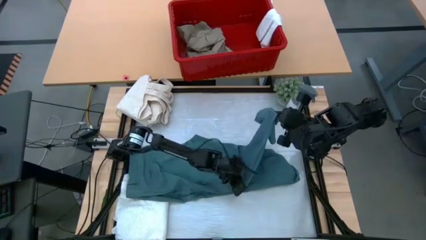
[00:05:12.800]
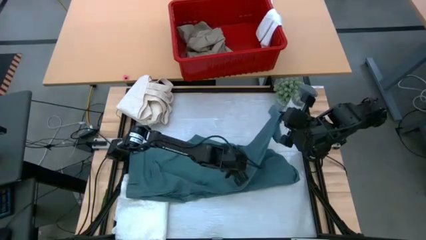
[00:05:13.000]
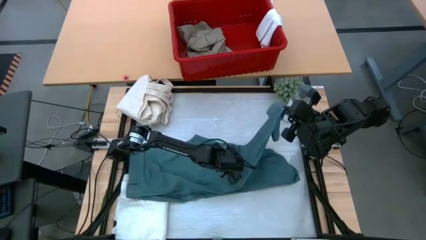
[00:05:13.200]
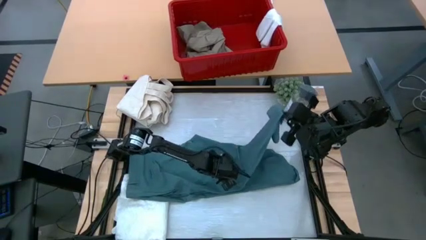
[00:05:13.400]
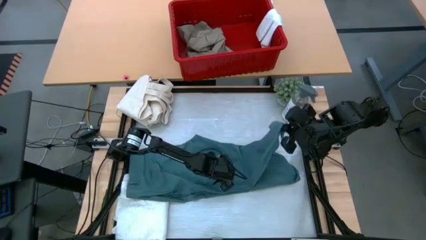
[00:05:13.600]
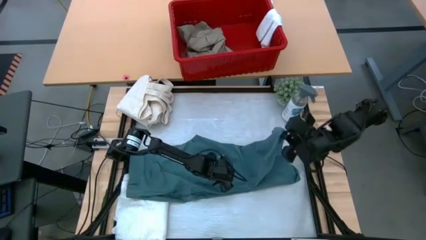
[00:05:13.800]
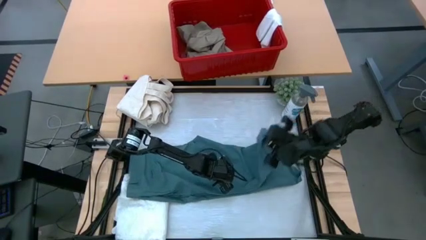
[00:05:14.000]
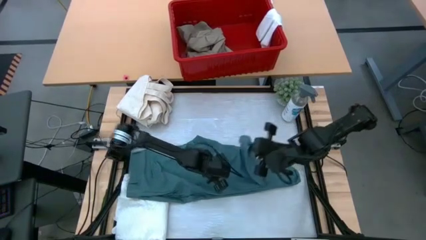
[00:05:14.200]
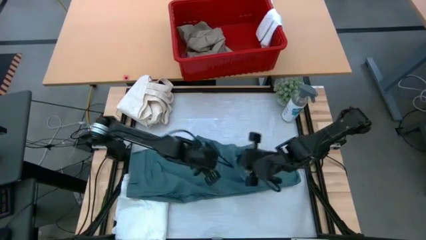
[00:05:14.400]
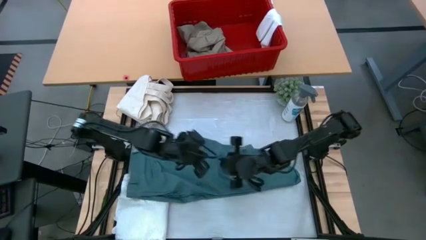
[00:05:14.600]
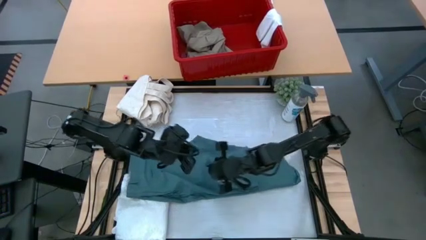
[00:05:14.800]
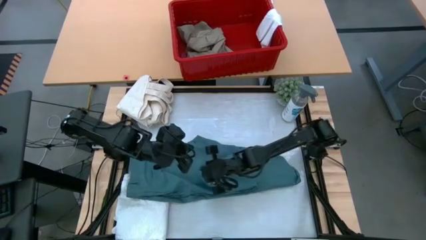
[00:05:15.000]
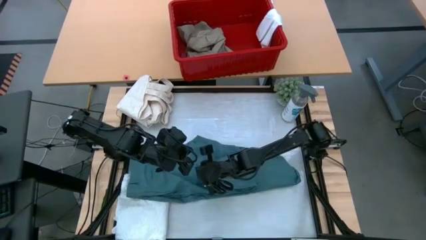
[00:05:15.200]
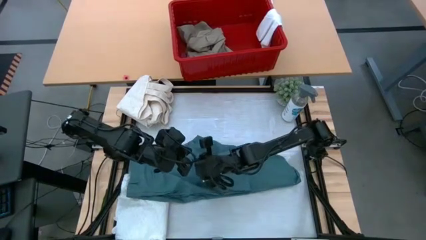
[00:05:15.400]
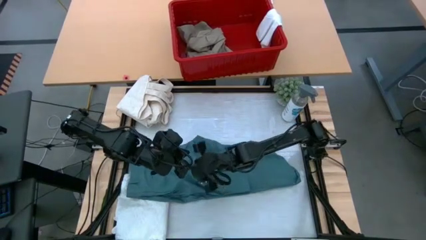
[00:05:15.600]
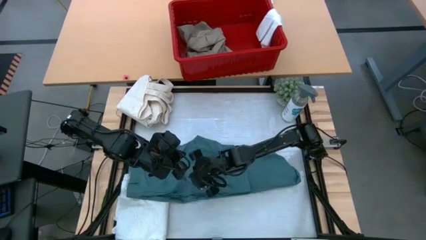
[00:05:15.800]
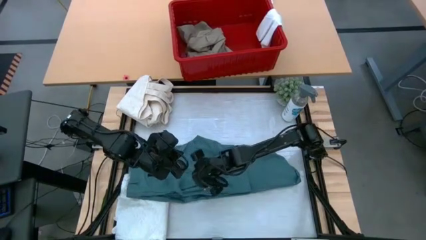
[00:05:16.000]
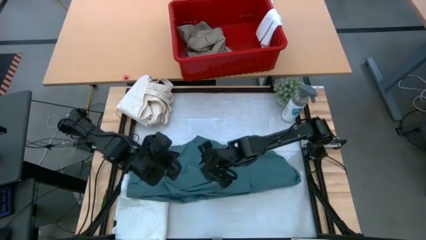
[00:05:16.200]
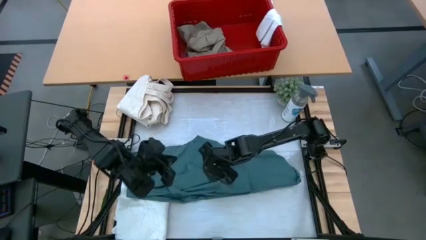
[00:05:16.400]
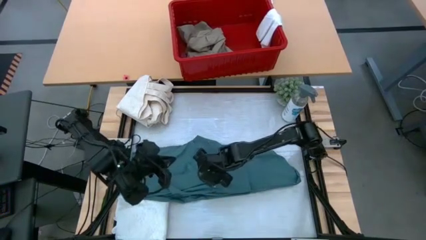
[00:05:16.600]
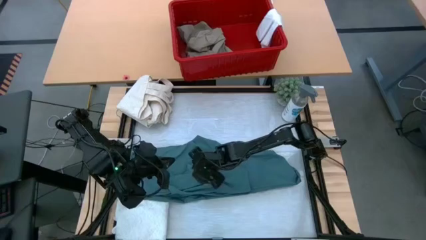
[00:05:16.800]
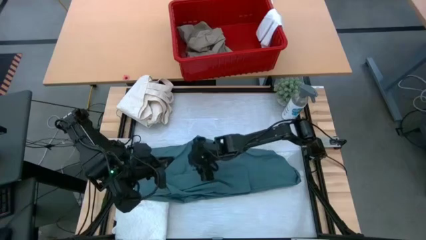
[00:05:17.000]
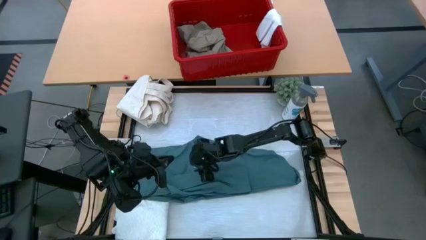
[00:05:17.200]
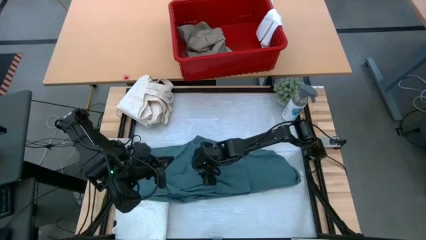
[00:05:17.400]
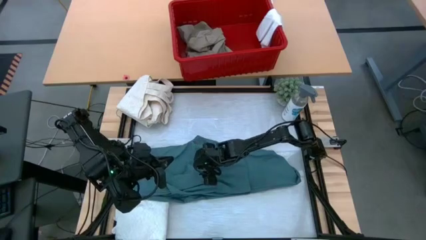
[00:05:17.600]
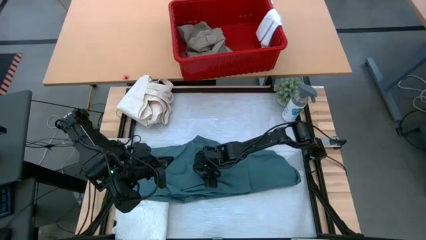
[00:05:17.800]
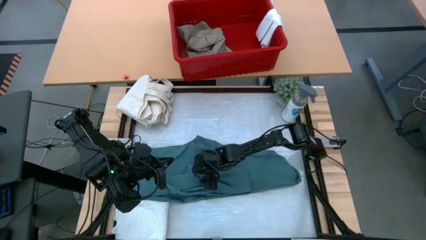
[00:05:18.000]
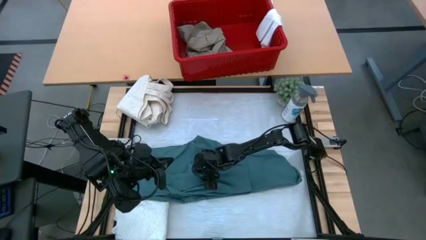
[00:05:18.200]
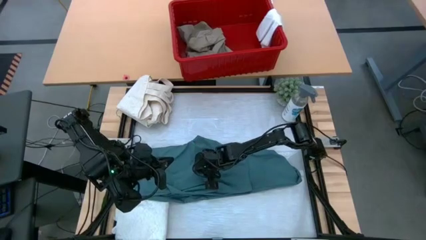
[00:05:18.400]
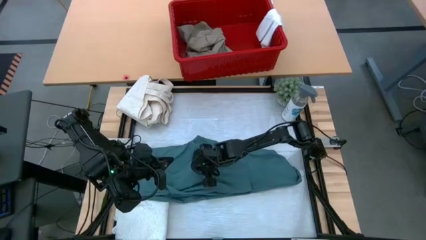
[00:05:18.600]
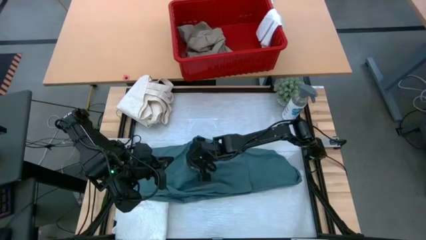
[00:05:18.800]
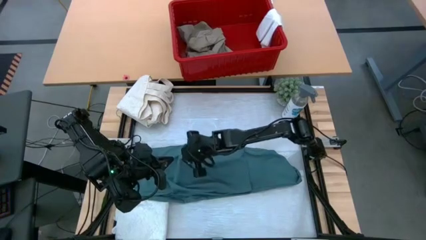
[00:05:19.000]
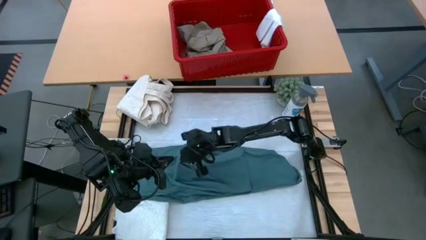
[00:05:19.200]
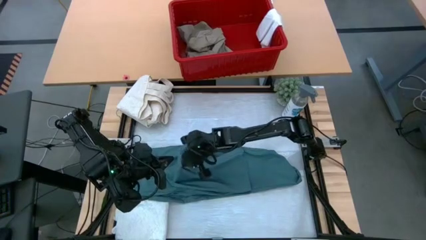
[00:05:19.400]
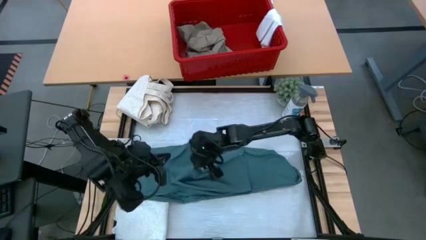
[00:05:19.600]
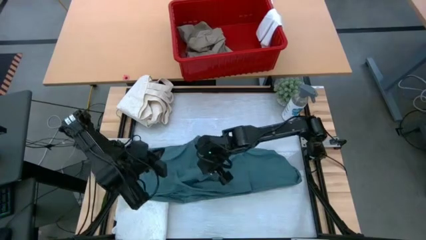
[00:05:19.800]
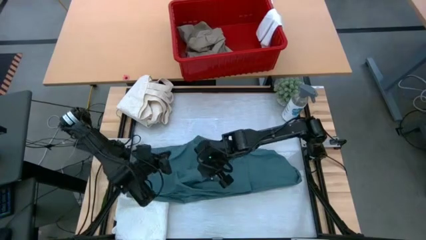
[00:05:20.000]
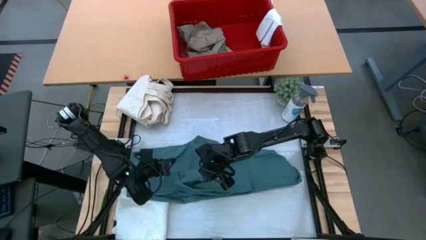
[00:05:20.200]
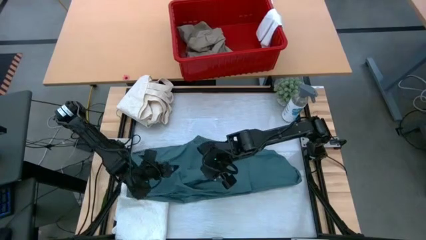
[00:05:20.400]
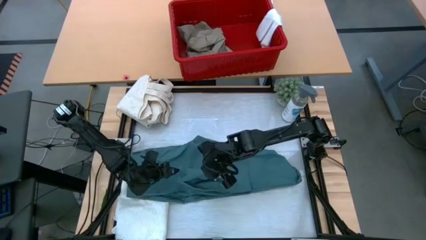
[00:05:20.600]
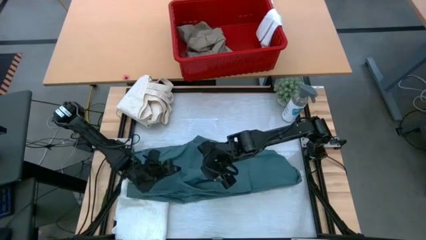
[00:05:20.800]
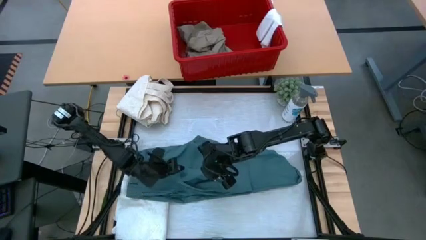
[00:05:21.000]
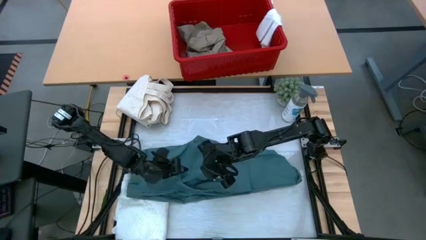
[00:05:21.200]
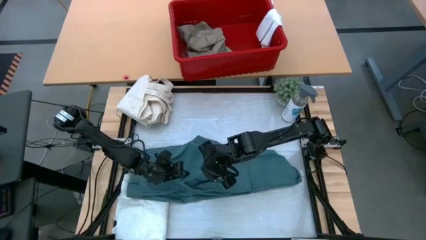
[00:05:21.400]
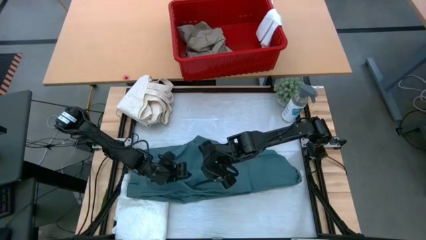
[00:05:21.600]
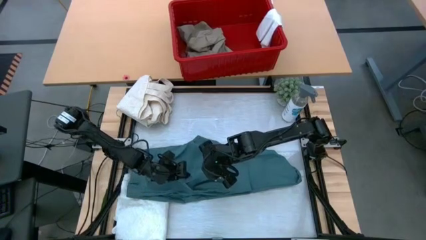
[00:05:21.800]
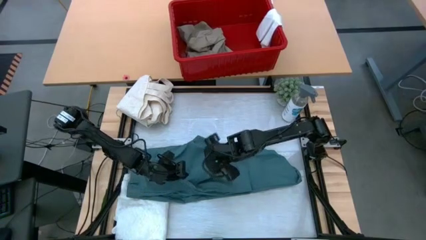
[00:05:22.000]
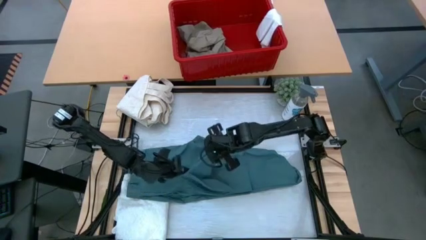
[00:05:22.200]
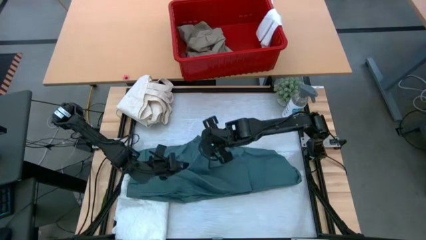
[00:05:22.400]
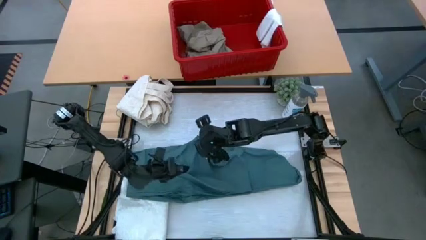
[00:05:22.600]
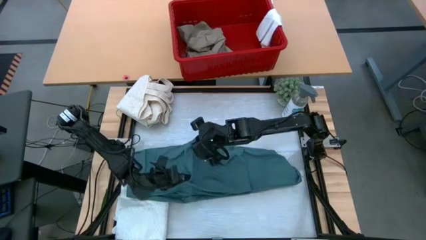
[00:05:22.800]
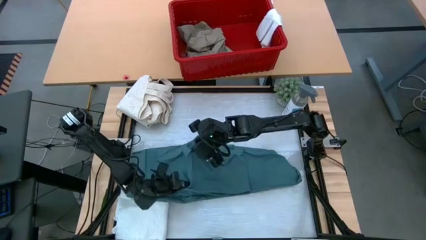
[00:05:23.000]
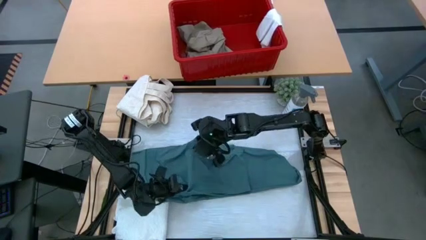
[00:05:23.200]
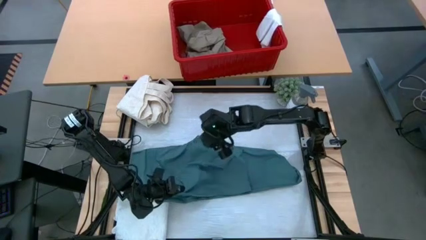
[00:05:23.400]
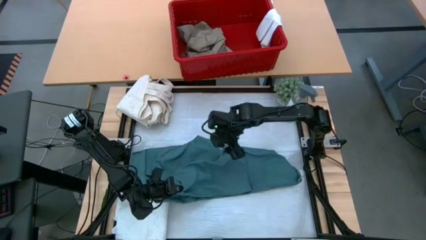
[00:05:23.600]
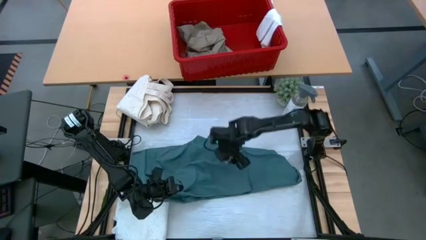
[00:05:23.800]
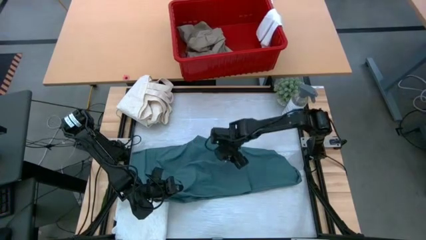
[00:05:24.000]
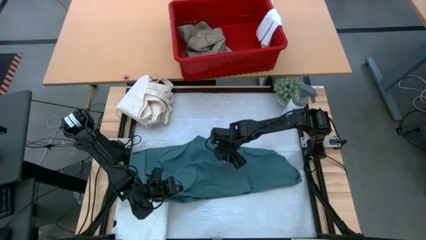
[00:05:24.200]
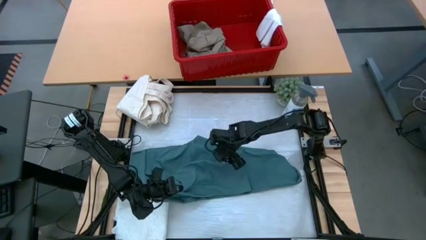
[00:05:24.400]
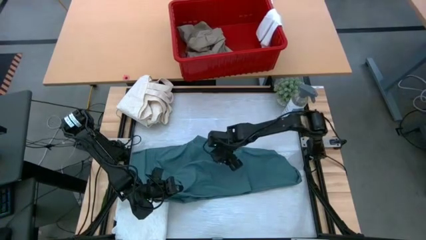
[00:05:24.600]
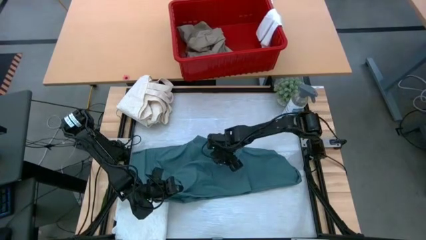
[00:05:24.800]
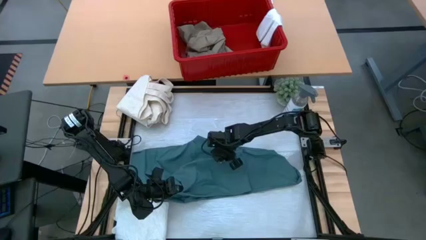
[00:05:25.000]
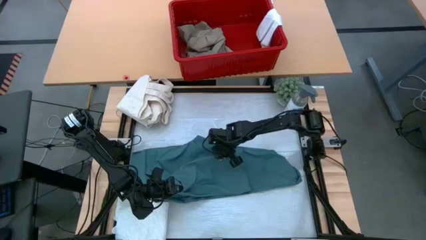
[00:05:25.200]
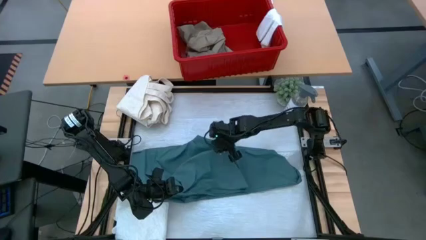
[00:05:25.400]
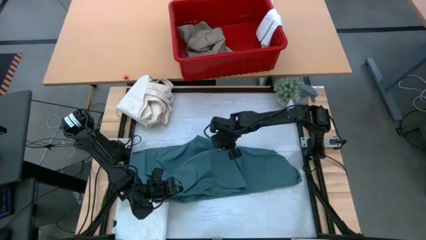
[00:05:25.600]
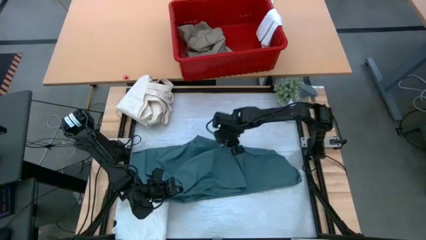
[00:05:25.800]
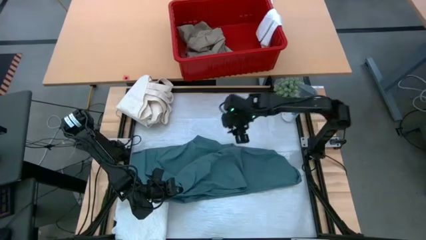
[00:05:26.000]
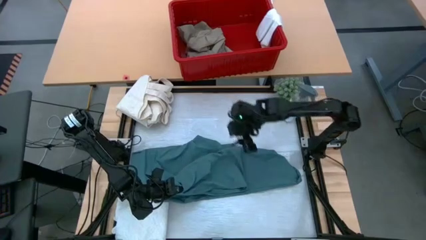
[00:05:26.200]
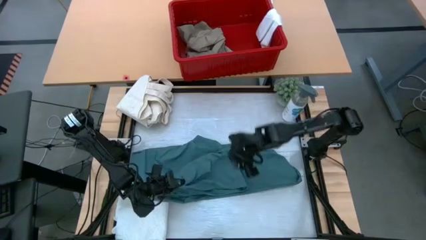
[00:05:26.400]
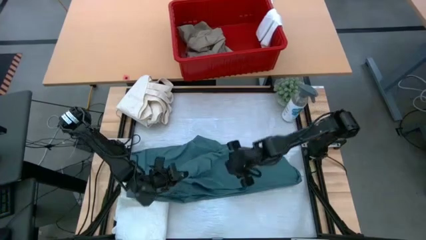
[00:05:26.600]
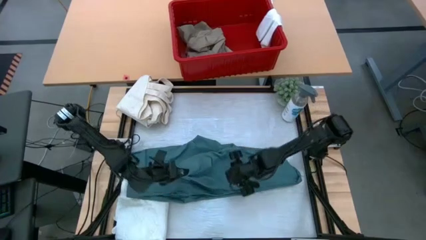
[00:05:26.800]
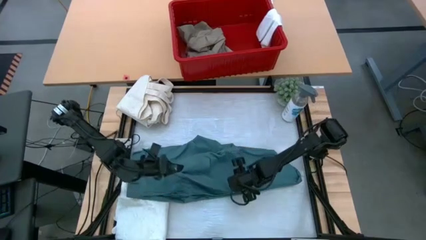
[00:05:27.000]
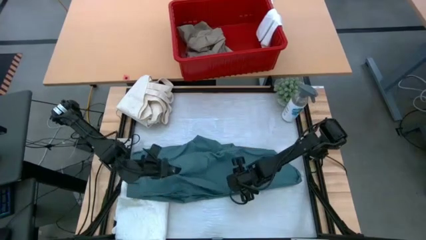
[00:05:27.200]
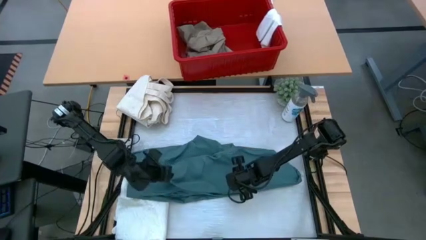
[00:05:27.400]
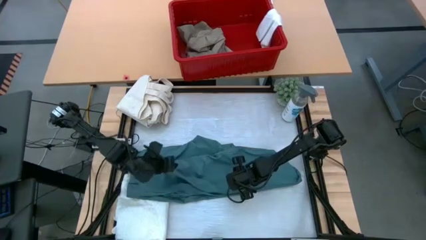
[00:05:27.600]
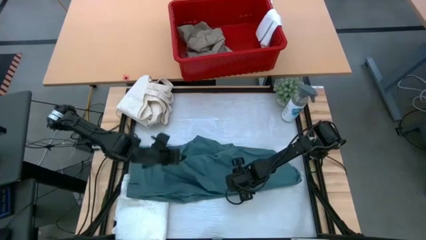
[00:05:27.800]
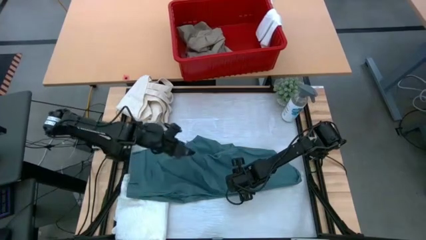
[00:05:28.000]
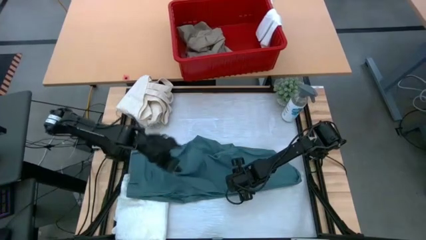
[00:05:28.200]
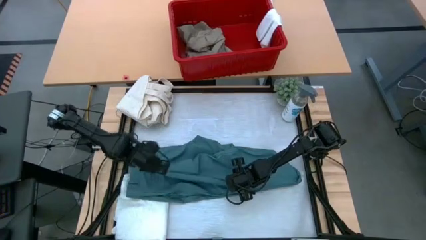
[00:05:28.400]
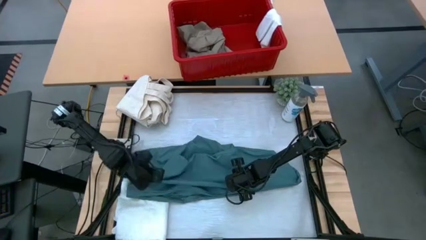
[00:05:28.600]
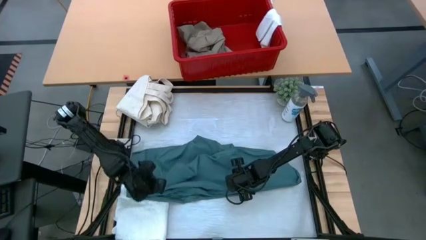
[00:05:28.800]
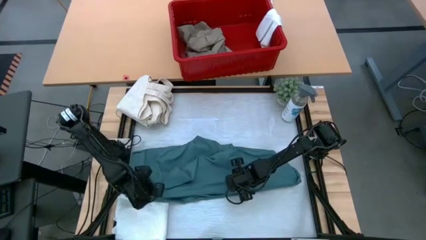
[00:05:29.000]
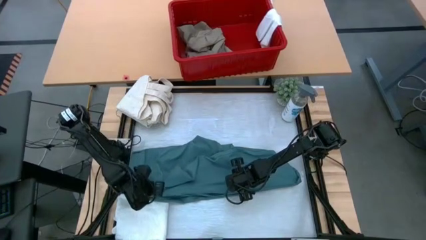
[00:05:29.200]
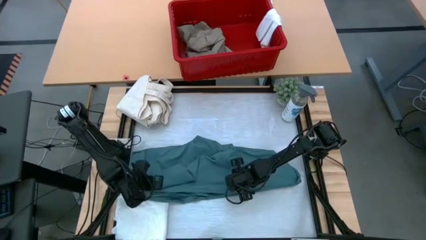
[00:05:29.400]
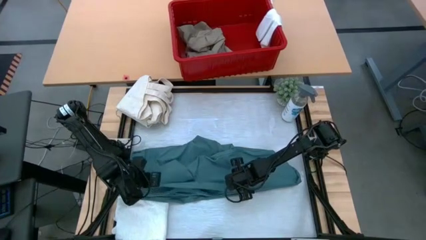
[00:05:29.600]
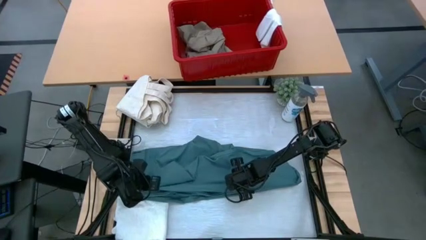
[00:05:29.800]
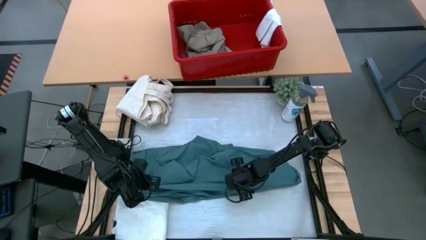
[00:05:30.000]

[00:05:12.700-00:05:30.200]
Task: Fold Laundry from Bin
Fold the blue pants
